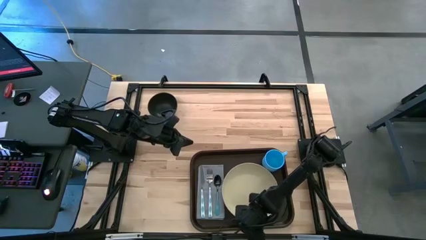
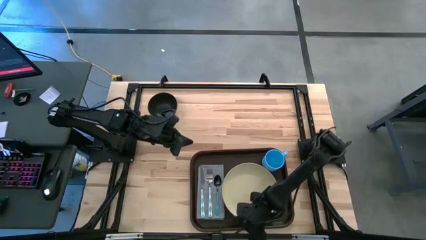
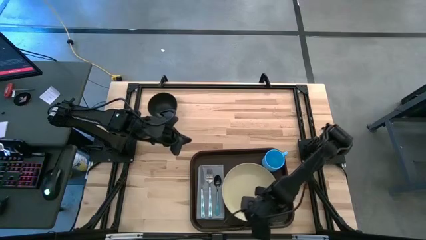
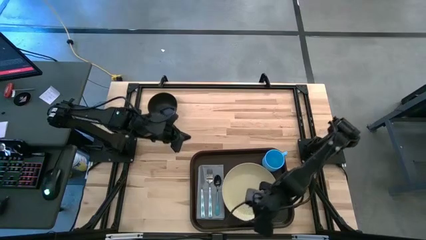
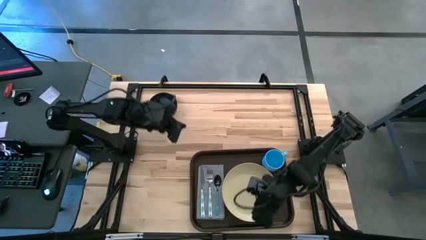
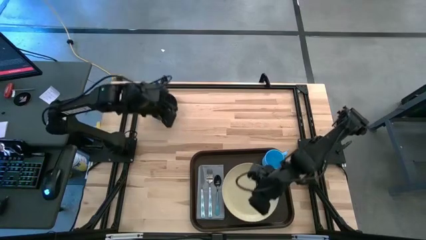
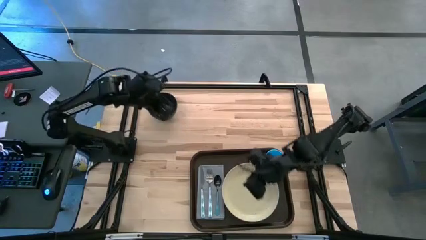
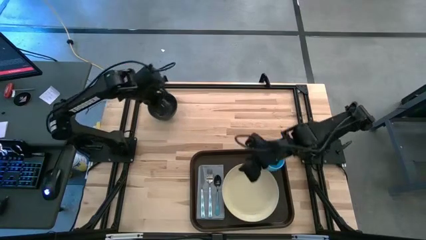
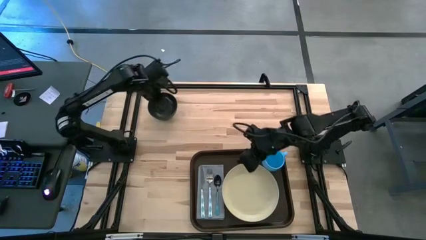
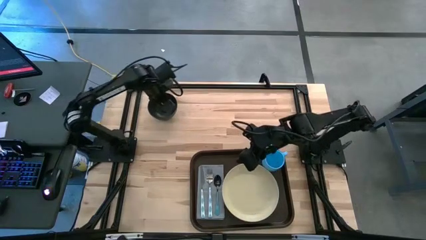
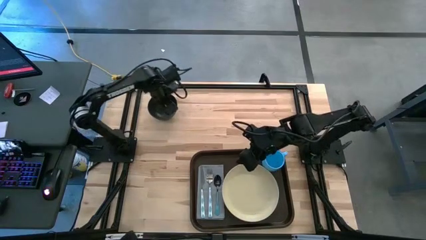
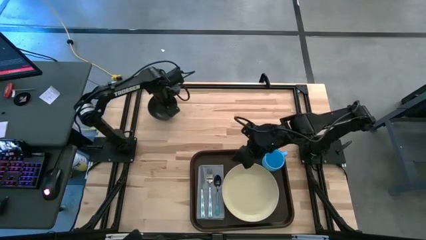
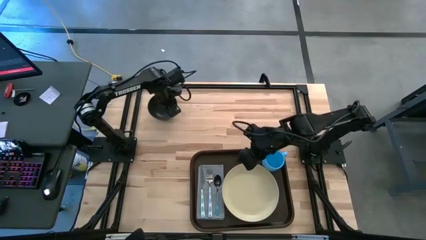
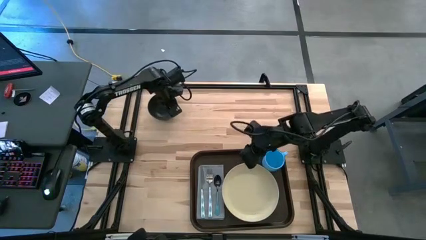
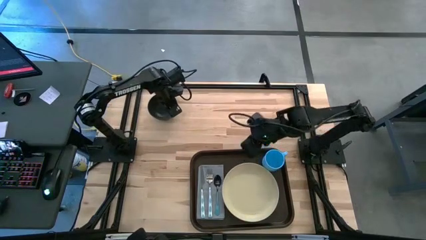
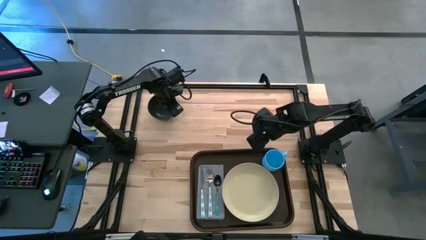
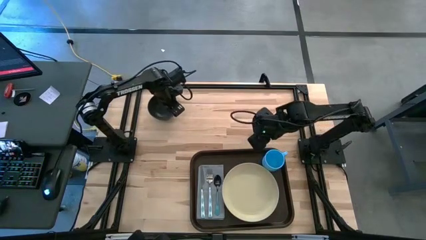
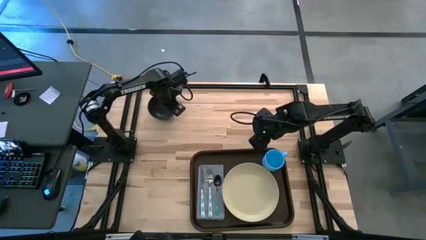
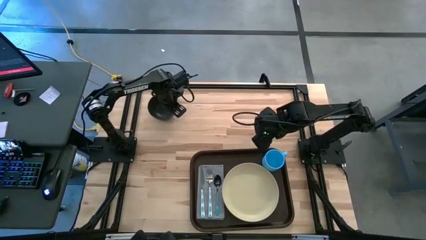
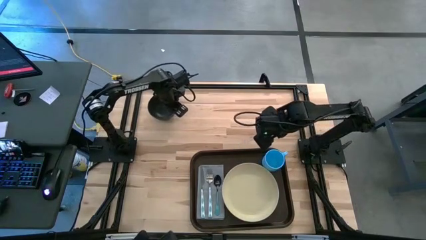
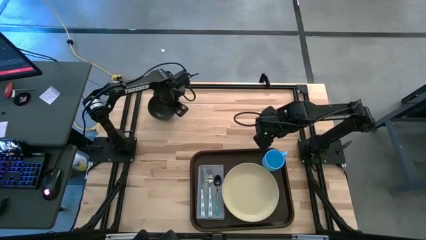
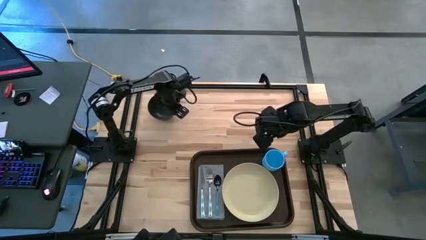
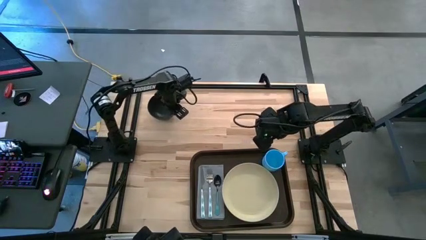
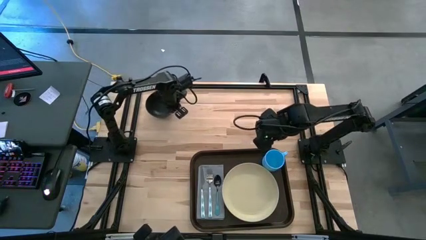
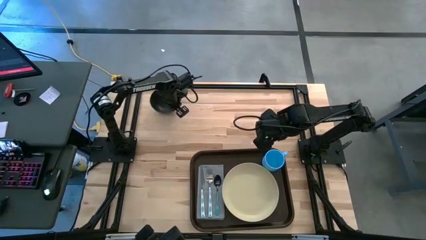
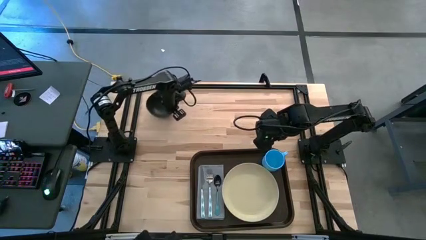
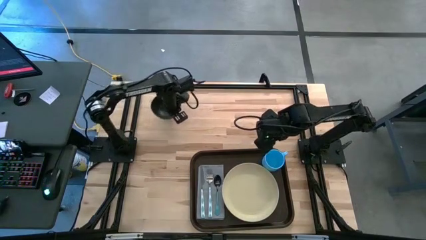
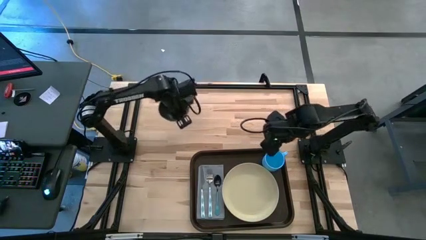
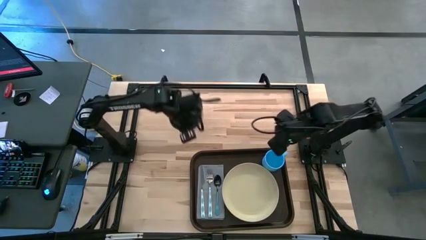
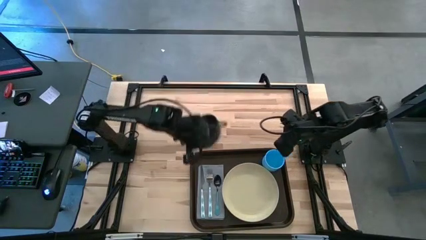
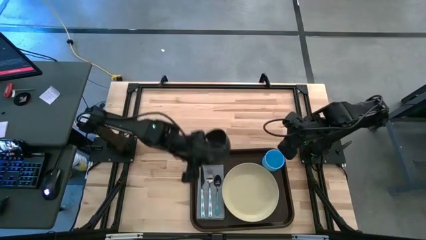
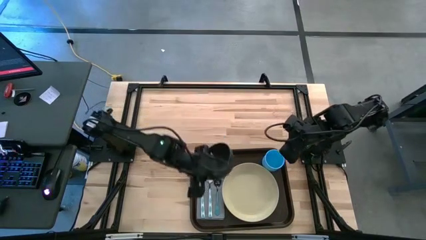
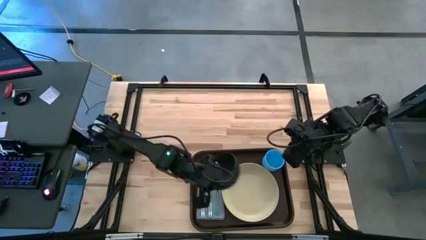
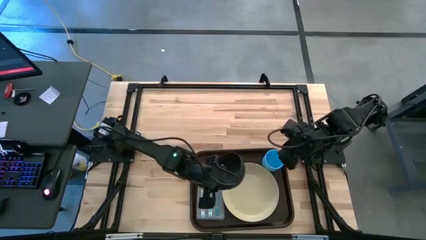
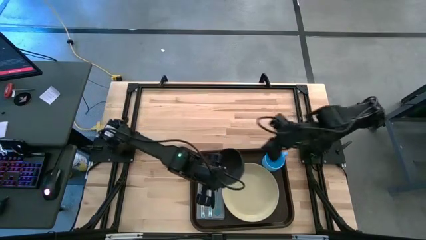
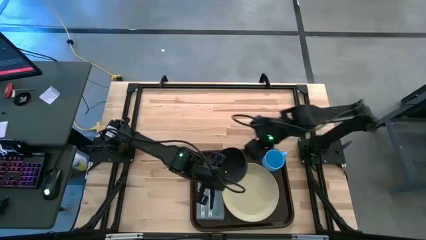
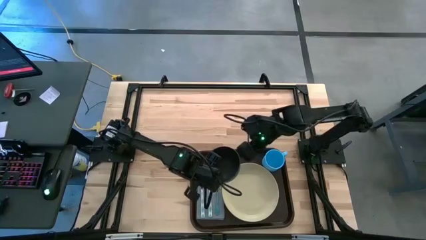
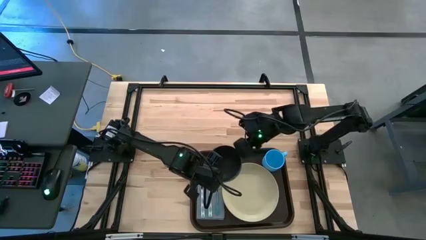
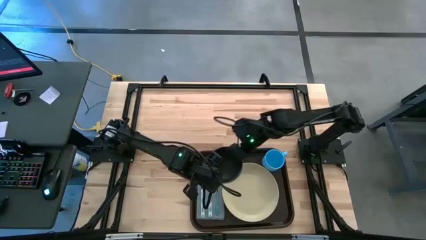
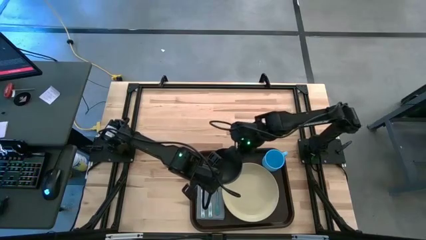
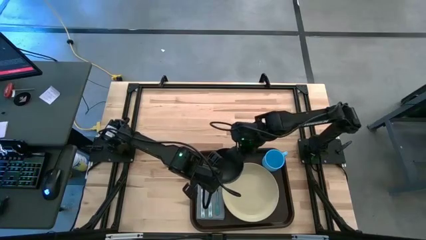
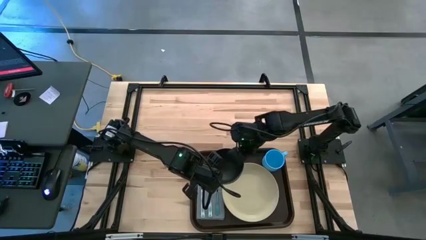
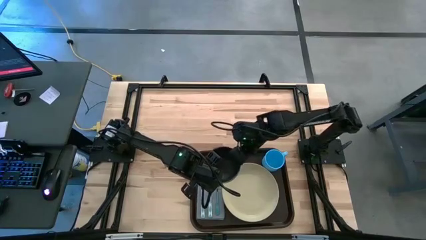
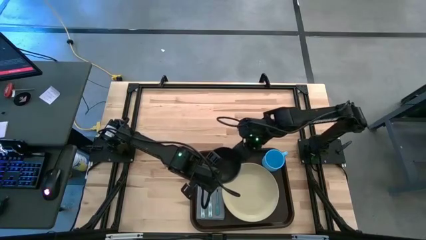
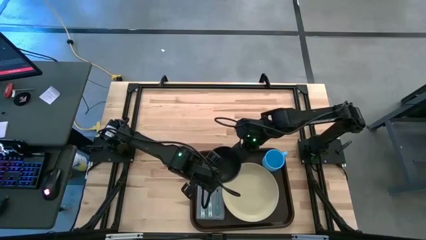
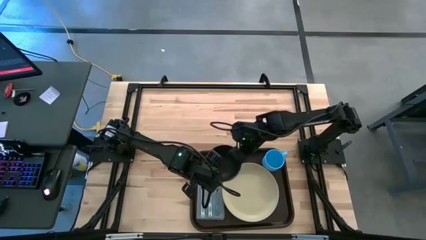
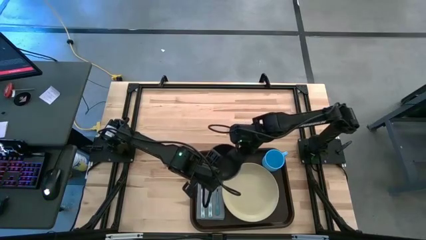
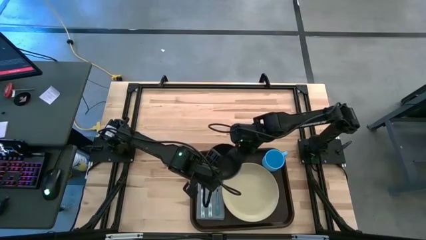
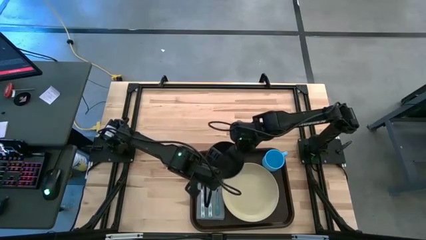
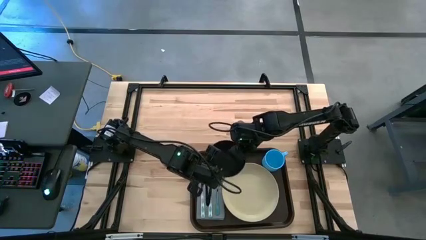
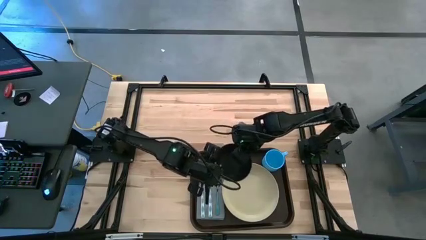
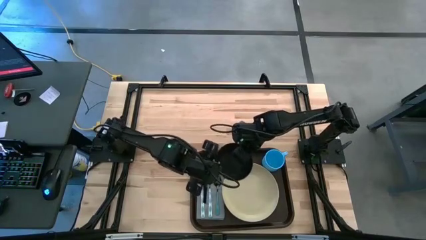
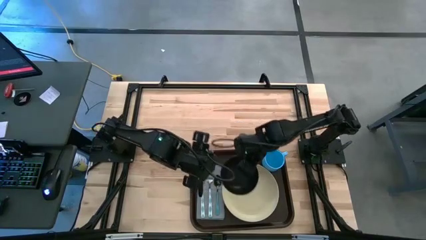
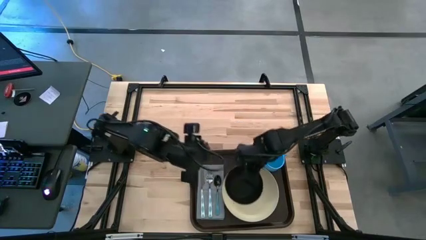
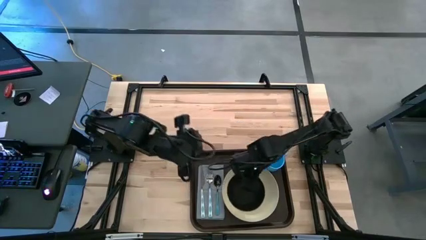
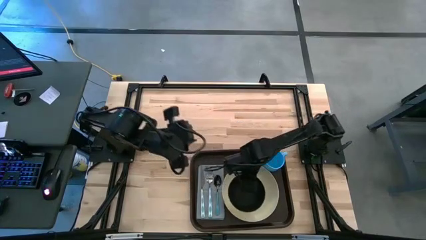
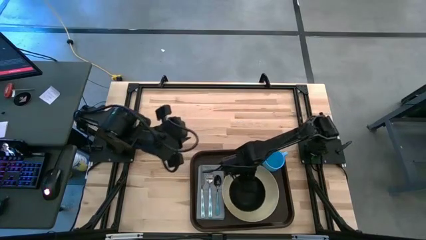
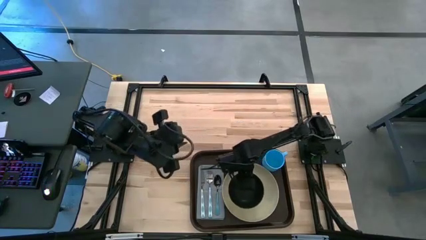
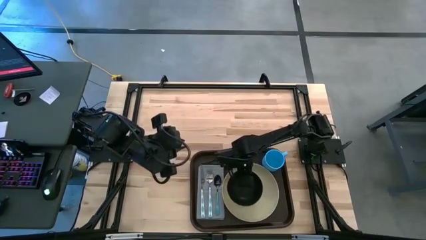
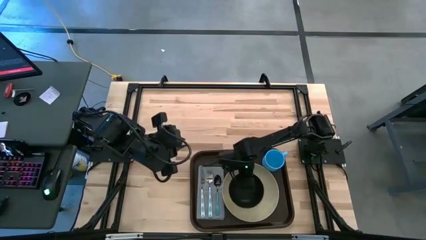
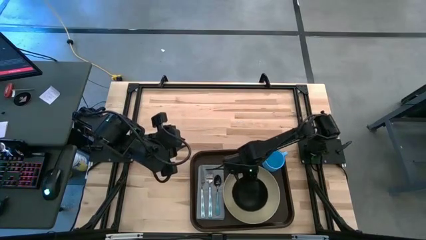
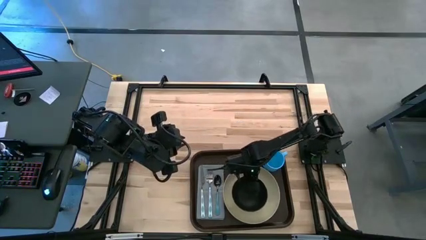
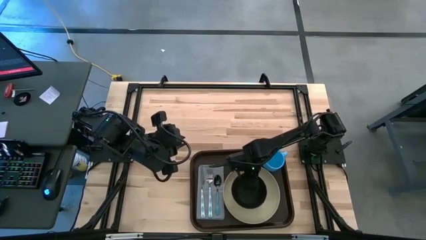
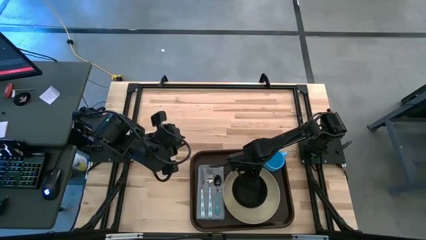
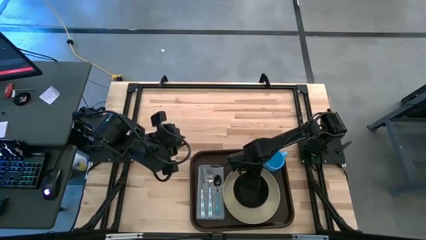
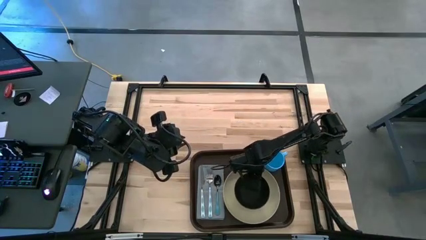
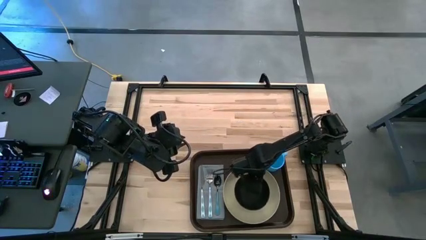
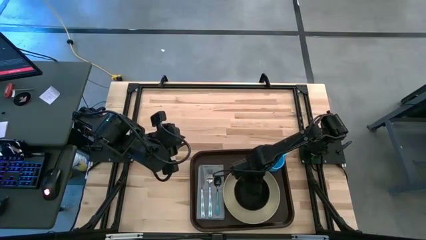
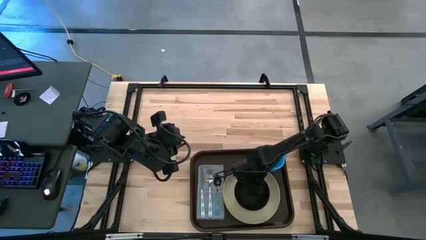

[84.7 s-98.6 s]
Task: Set up tray
Put the black bowl on the top of the white plate
